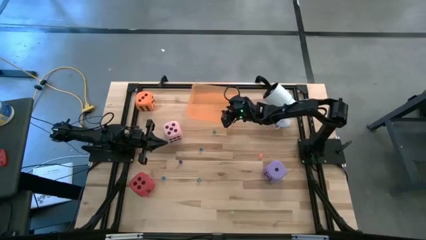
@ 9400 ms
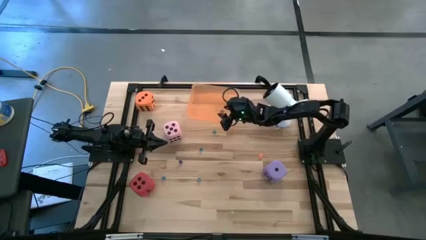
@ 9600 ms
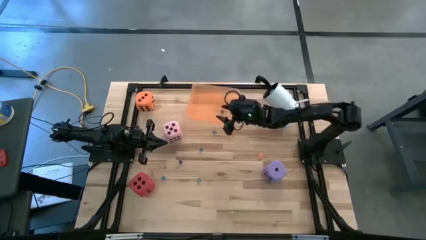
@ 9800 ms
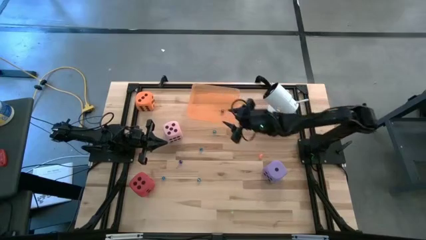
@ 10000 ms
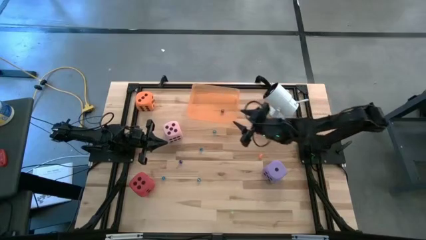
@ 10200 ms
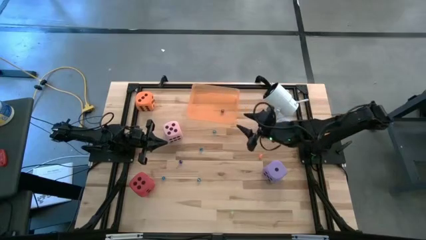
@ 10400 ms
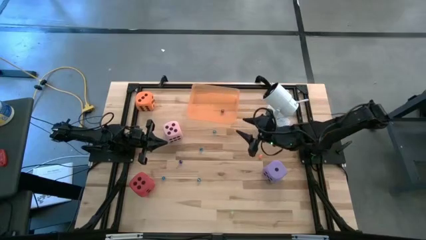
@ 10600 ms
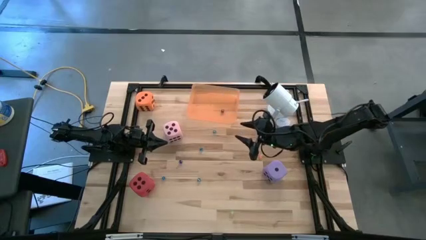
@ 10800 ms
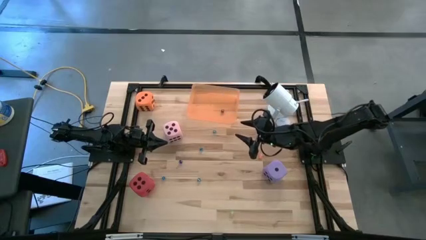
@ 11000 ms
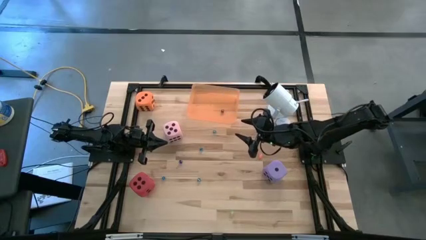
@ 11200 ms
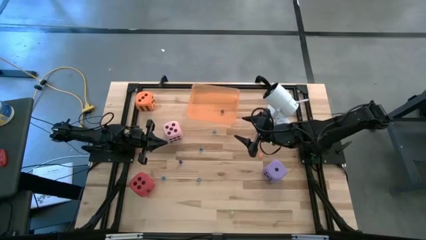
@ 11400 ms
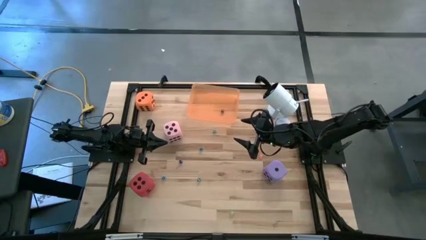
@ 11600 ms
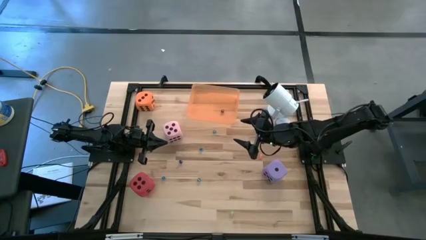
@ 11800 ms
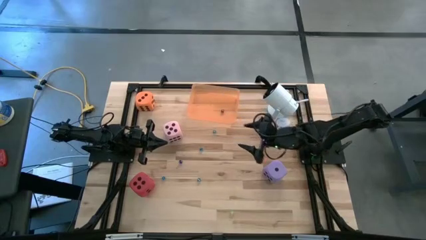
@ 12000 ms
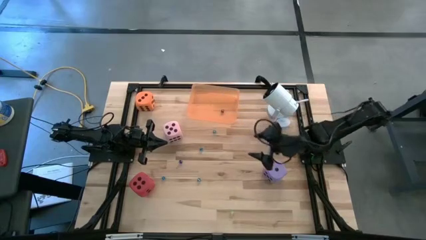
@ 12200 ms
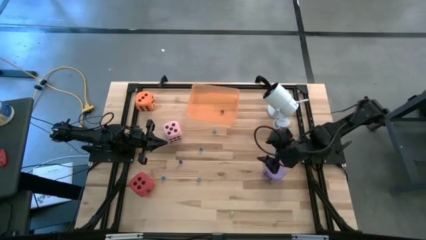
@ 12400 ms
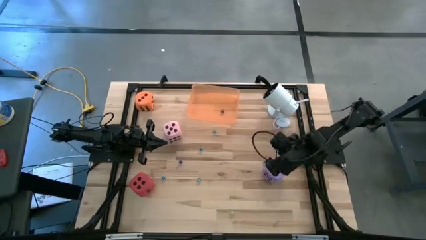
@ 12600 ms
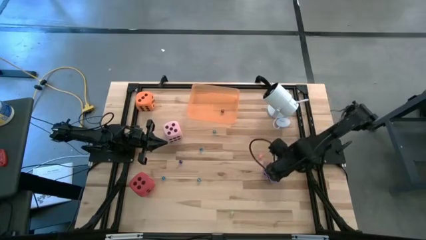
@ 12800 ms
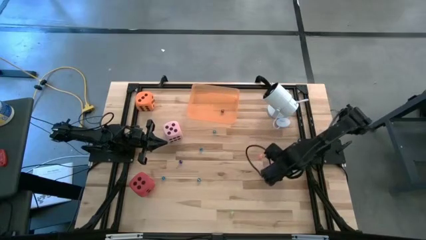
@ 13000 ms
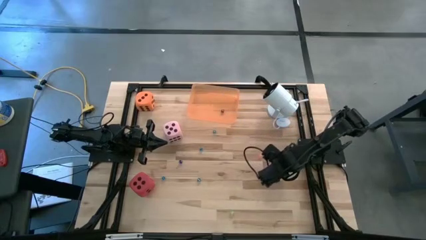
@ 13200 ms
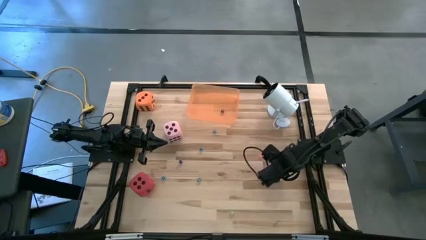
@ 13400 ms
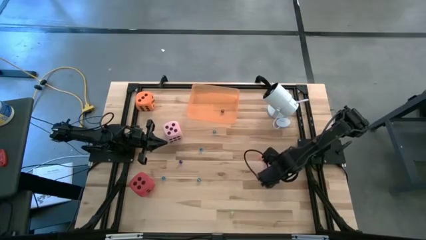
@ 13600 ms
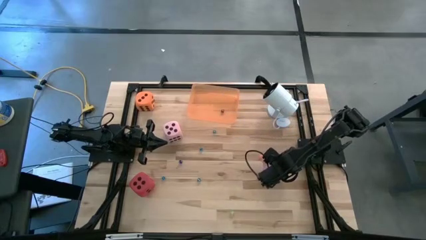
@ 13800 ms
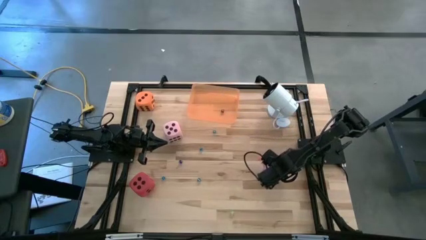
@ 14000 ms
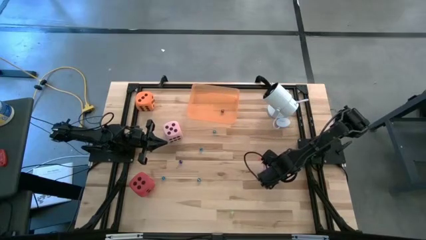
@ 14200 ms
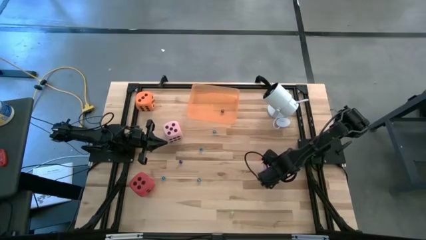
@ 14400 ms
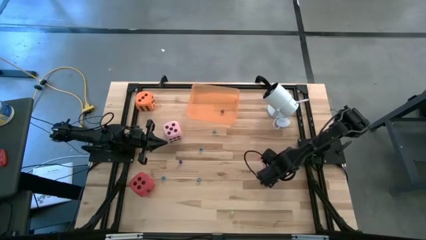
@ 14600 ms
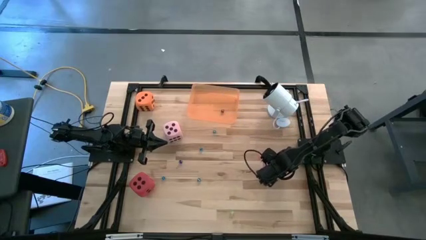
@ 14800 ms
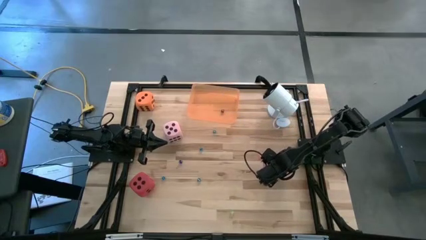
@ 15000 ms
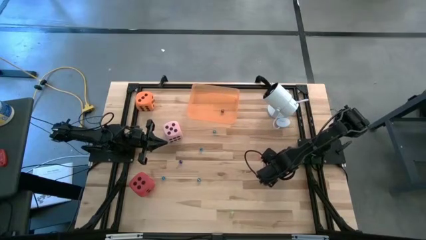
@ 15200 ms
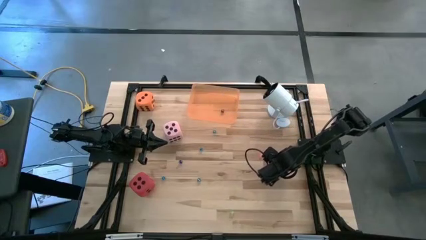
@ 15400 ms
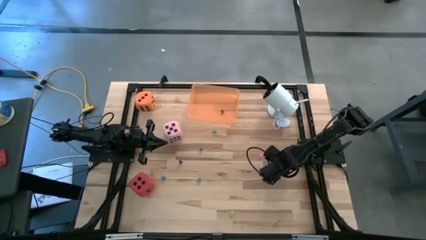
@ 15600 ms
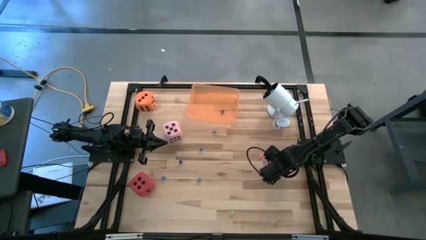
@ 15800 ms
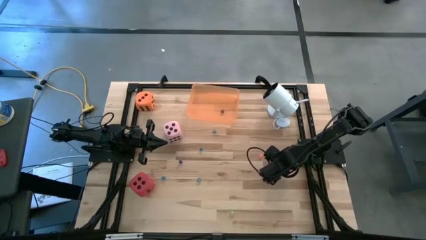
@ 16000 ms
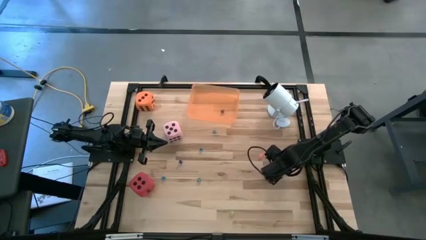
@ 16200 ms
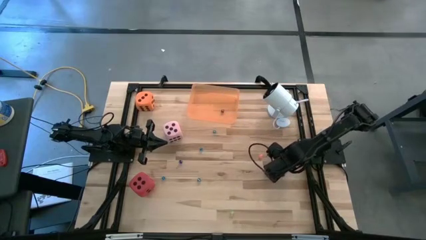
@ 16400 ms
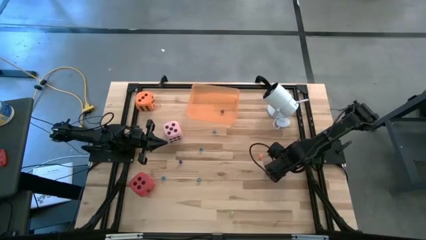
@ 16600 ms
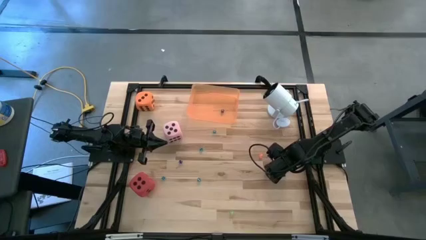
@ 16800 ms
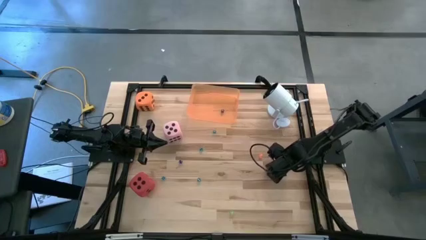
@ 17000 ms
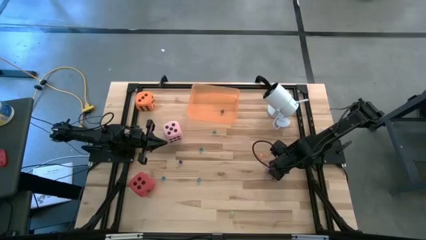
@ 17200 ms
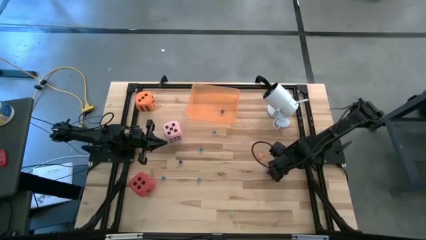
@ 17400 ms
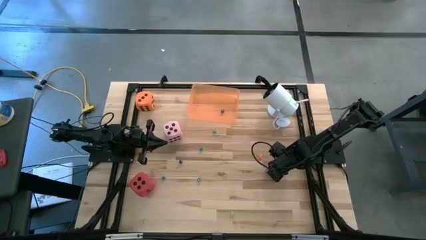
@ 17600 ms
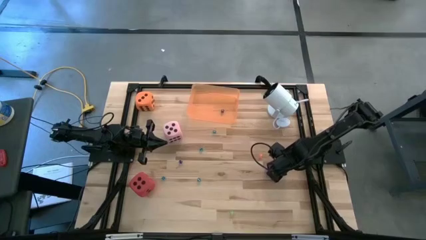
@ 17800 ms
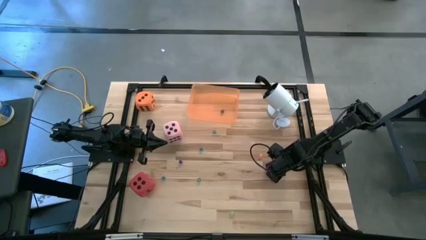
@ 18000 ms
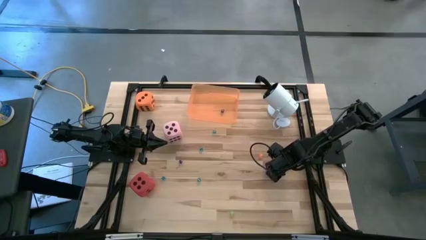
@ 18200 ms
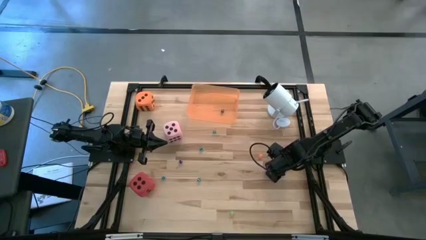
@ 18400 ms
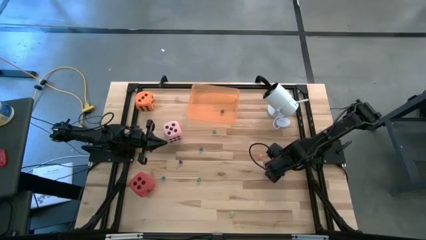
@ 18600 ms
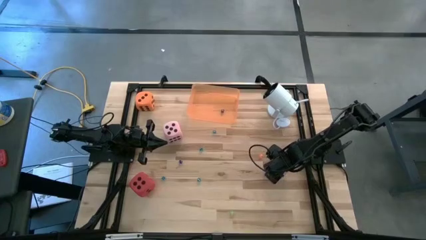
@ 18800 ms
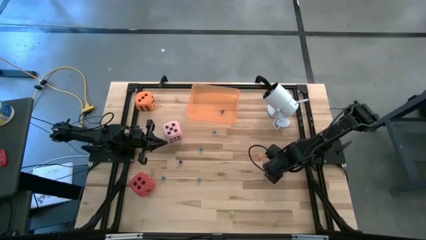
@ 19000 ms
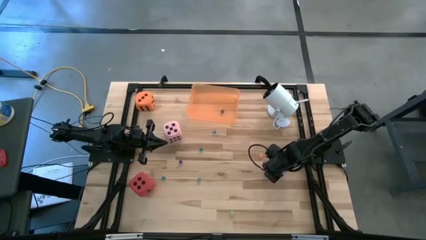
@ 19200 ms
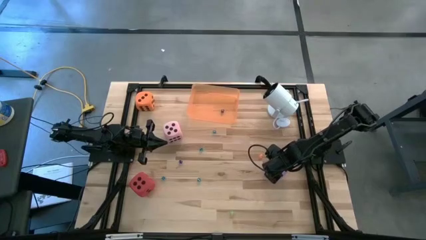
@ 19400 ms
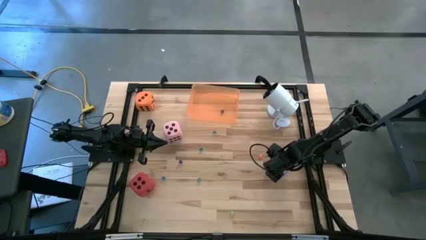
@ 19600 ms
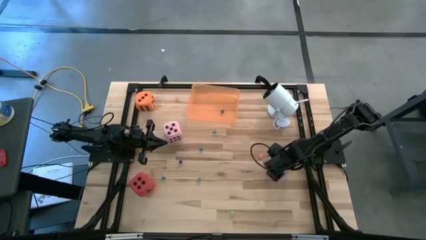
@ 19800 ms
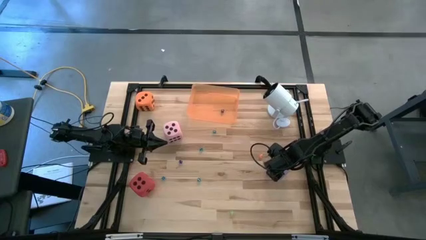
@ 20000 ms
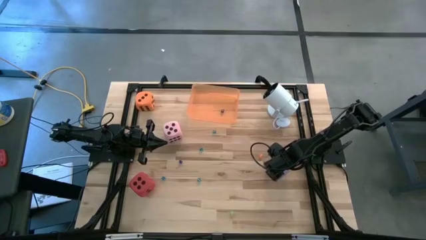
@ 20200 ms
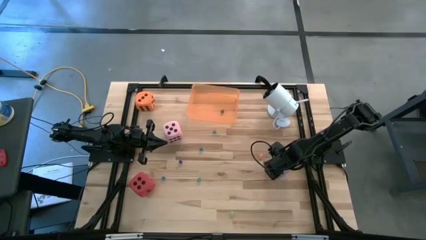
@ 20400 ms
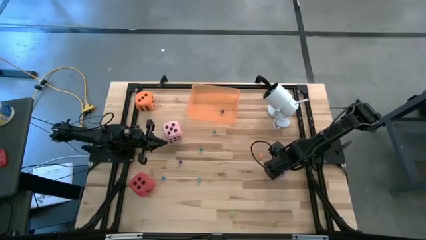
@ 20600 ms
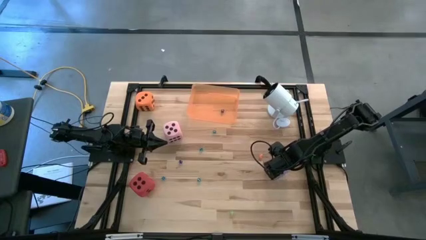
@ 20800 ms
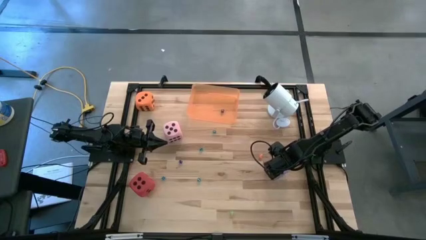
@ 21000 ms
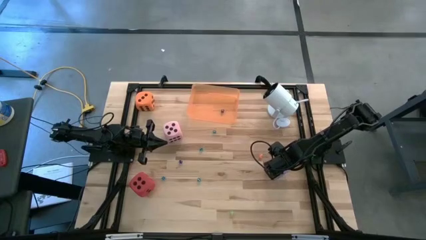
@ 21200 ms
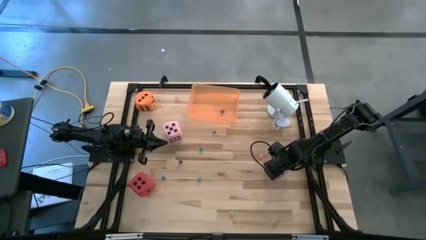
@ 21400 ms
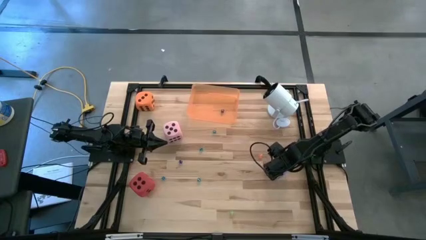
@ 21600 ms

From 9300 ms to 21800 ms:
Task: Pick & Place Dice
Put the large blue dice in the orange bin

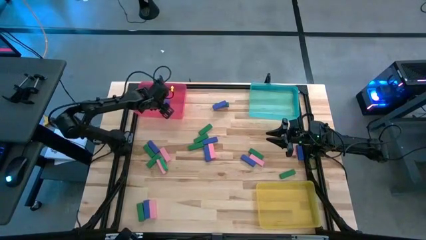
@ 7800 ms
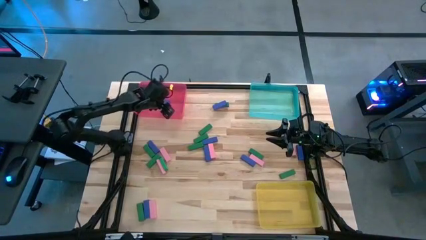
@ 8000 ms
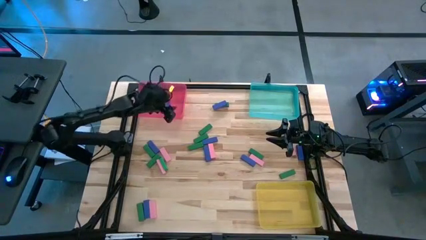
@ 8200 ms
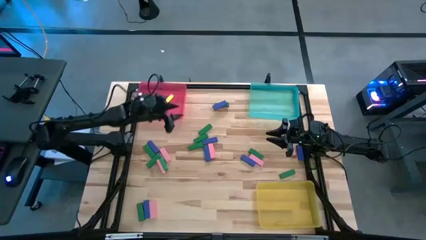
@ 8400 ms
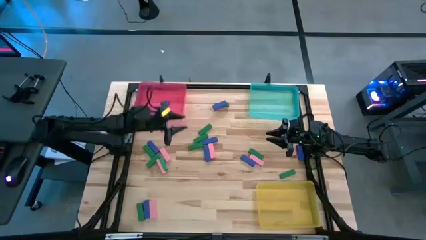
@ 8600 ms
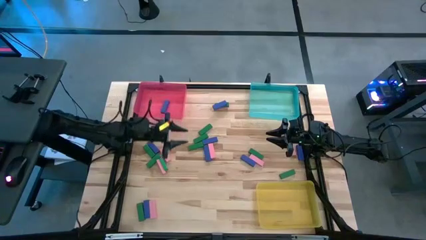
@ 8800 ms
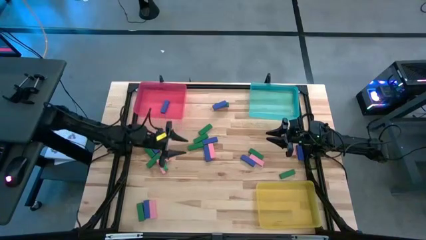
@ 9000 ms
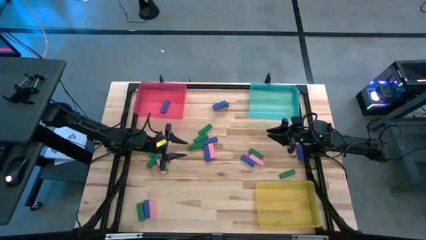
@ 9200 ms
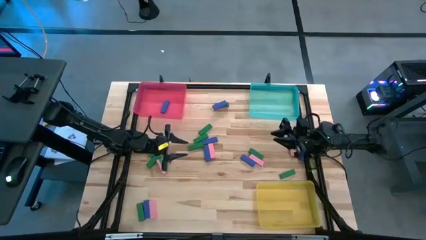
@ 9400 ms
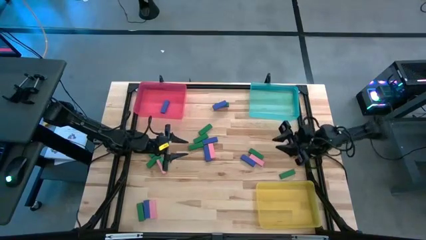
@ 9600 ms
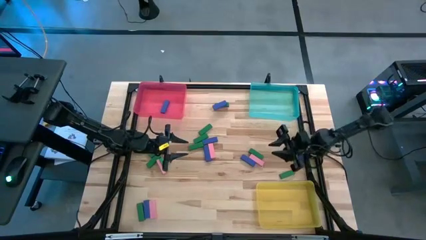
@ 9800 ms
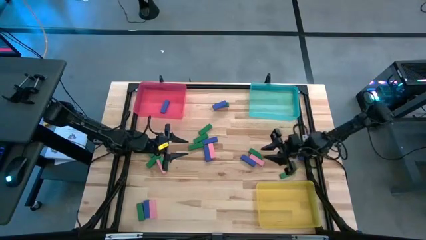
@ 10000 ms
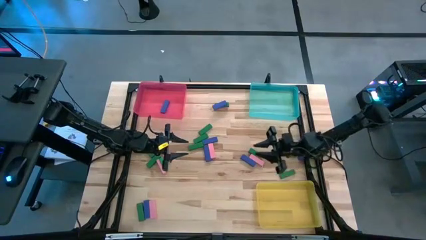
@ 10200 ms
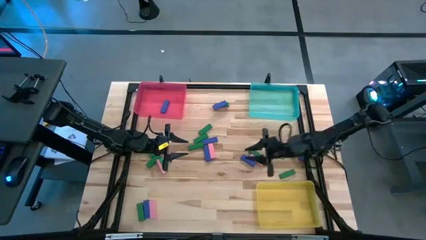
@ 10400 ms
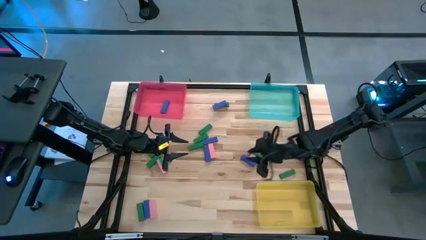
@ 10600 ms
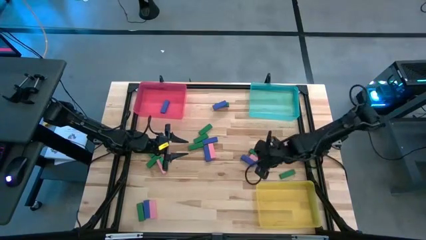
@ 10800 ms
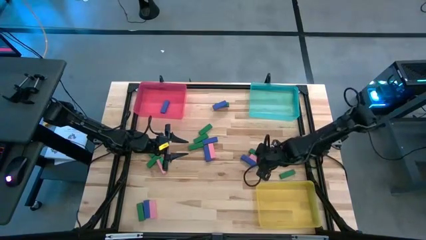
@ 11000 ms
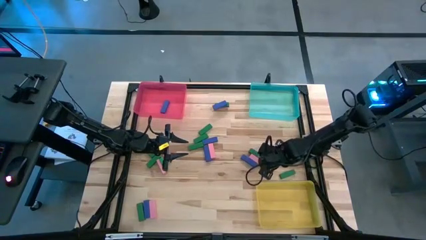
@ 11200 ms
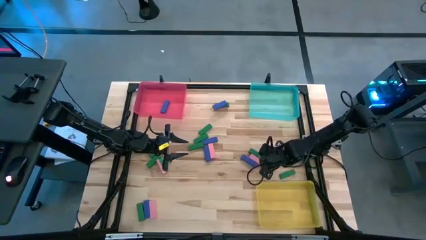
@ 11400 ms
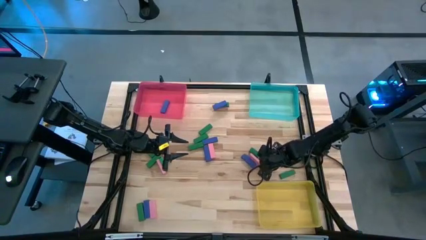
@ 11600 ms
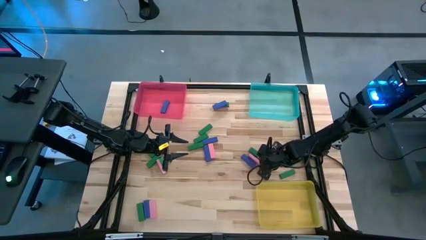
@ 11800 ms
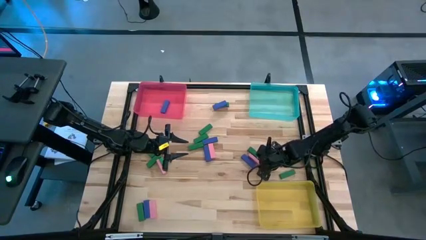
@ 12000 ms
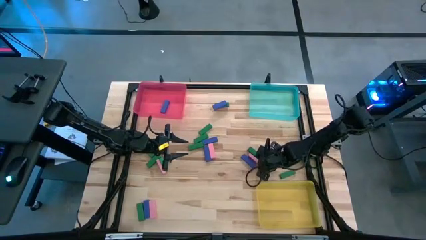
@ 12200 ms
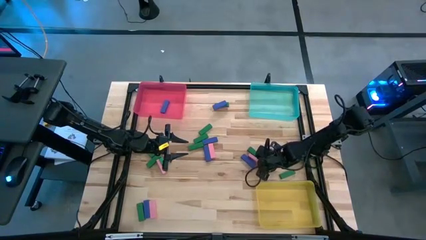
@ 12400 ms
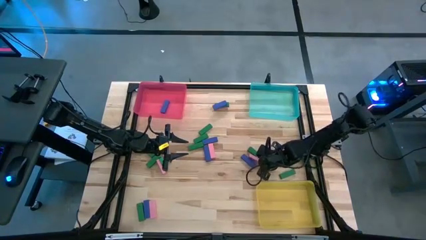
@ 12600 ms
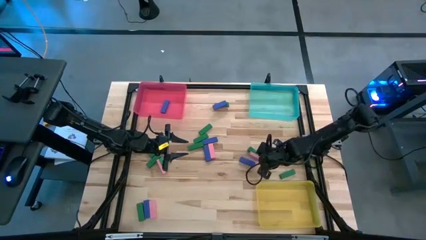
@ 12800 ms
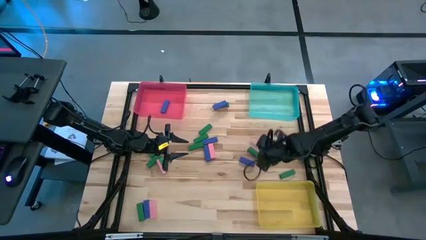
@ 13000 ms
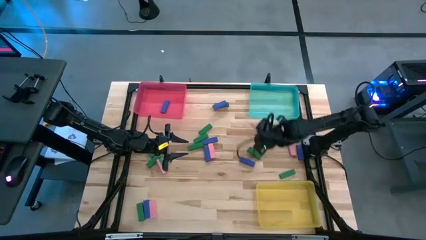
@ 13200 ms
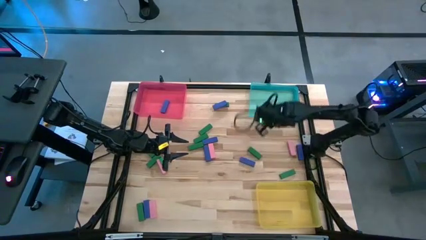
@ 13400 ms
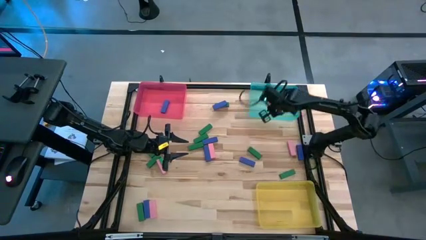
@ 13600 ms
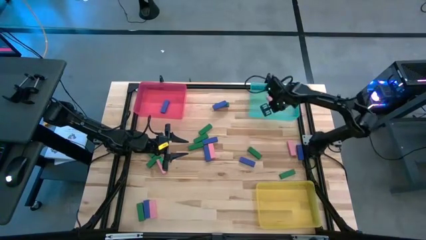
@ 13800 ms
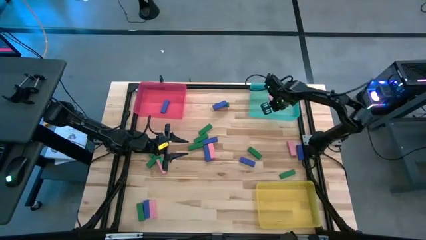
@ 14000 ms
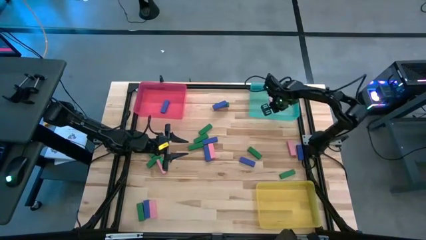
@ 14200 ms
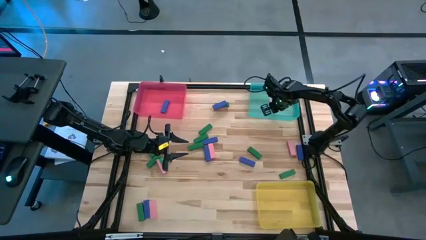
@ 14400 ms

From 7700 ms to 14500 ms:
Task: Sort blocks
Put the pink block into the blue bin
